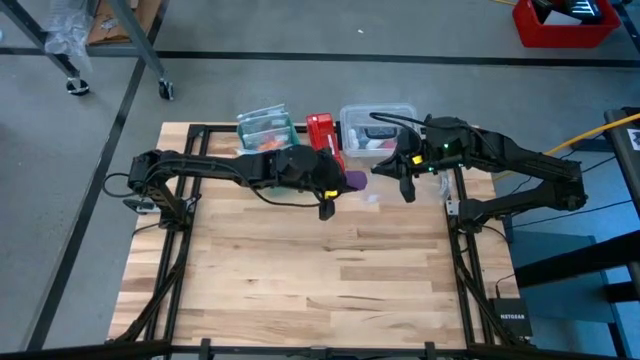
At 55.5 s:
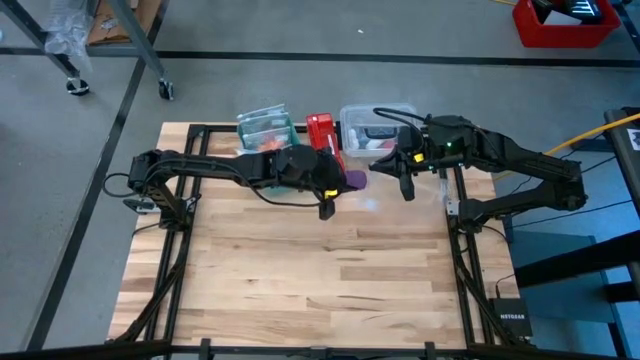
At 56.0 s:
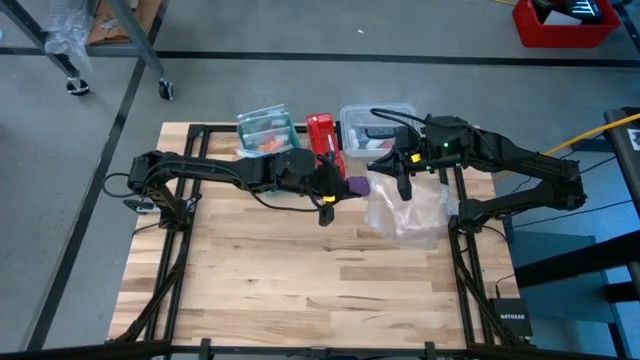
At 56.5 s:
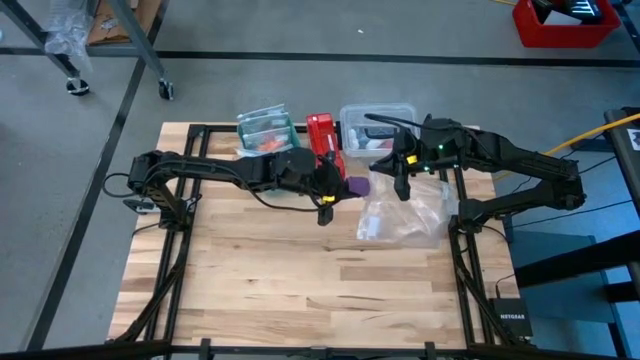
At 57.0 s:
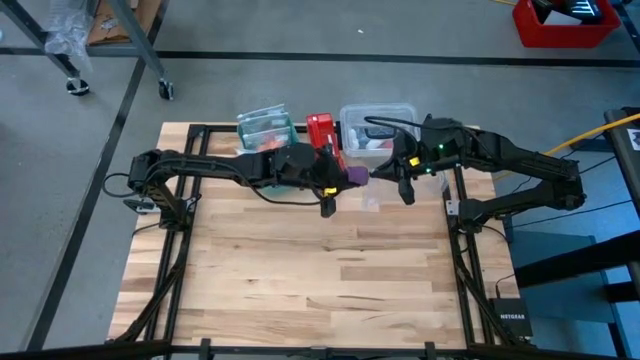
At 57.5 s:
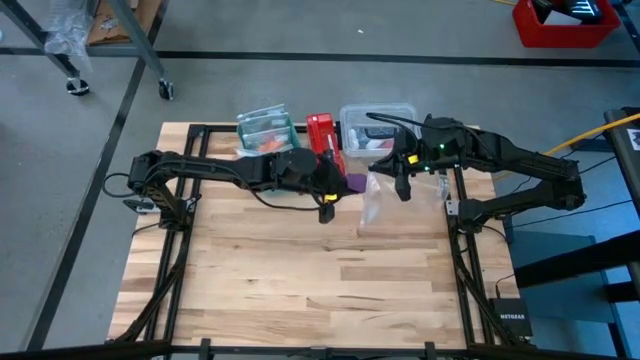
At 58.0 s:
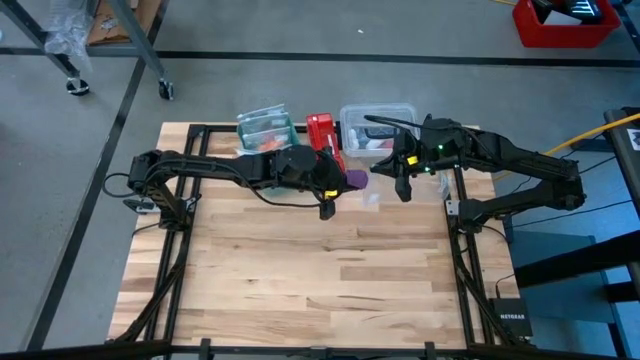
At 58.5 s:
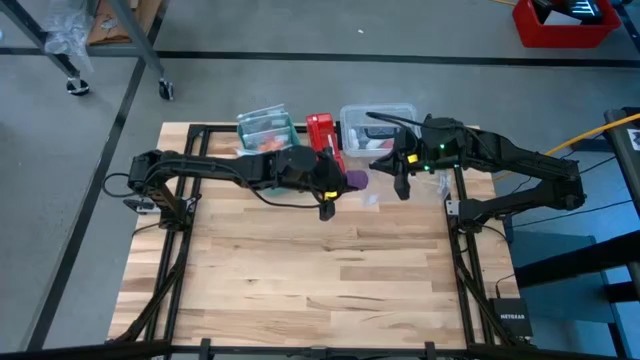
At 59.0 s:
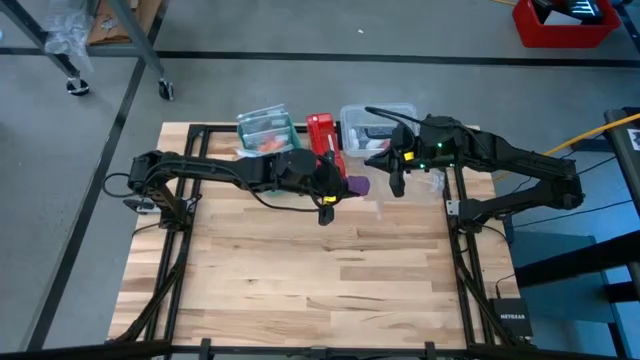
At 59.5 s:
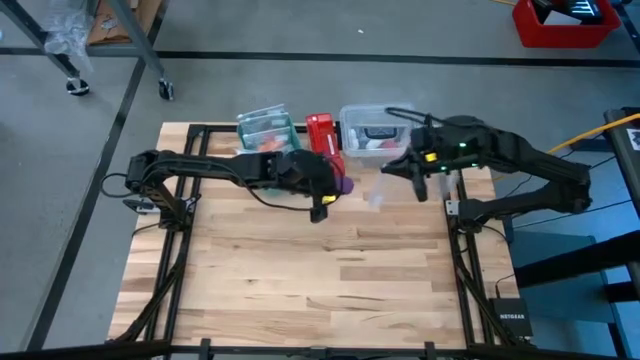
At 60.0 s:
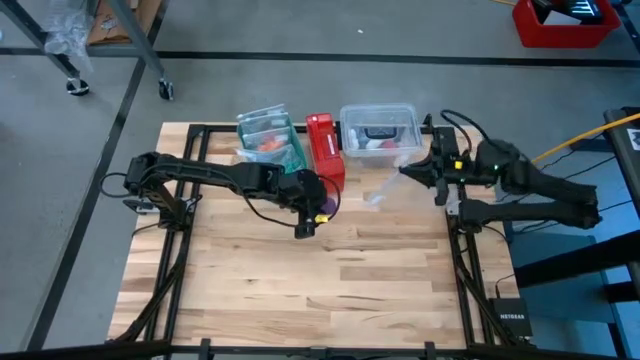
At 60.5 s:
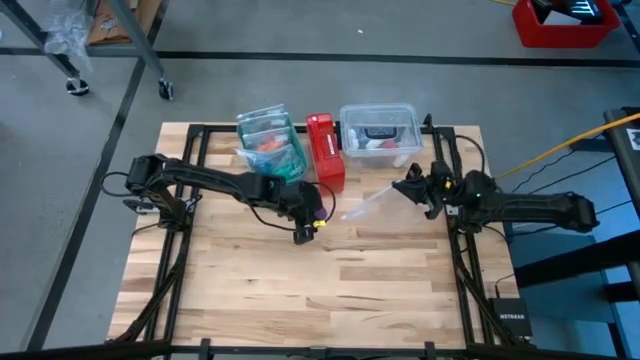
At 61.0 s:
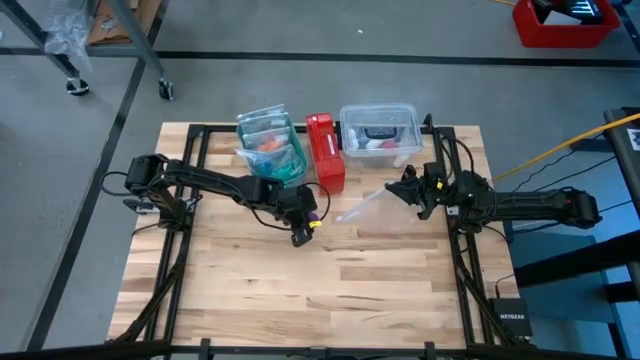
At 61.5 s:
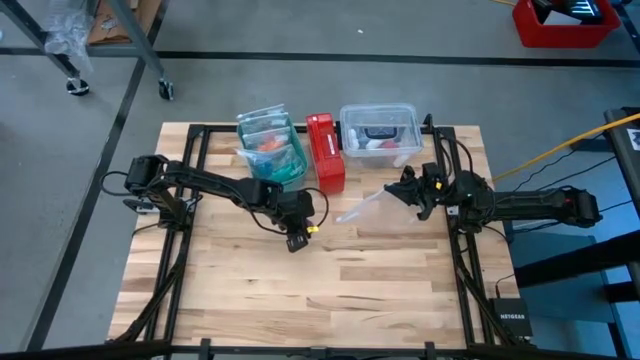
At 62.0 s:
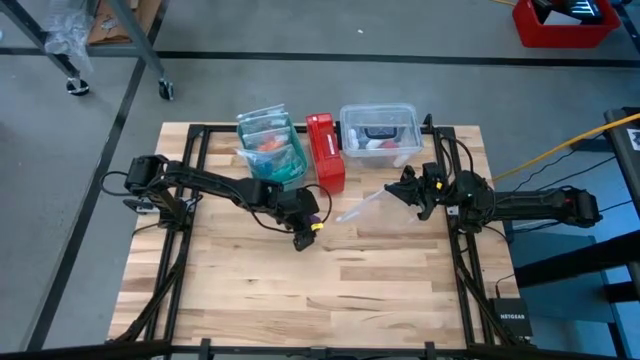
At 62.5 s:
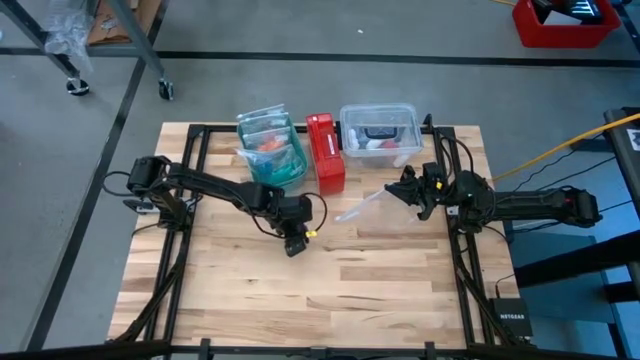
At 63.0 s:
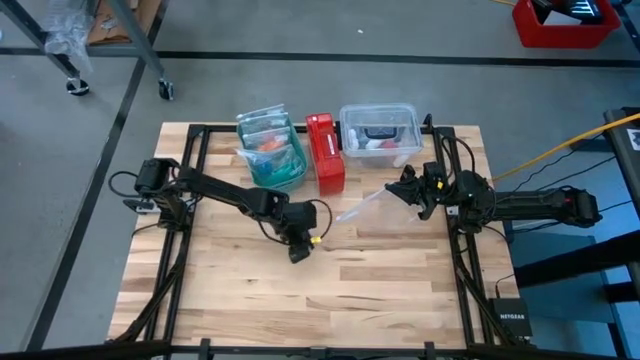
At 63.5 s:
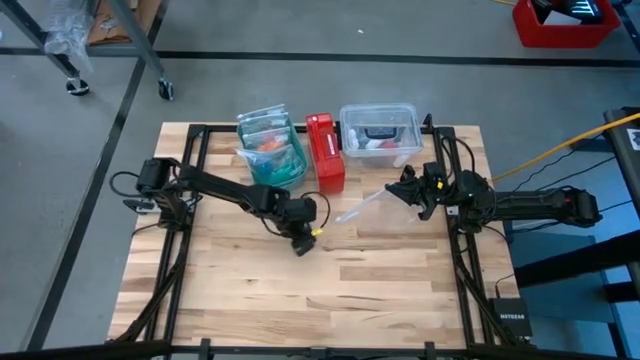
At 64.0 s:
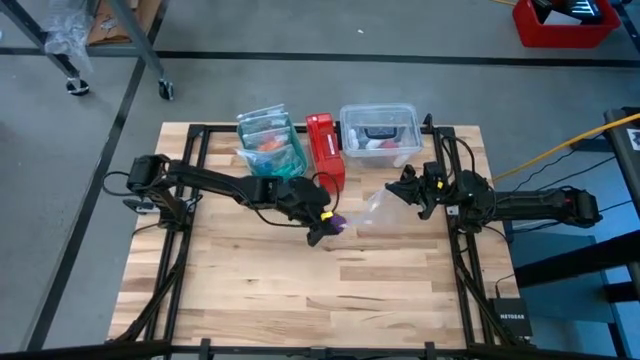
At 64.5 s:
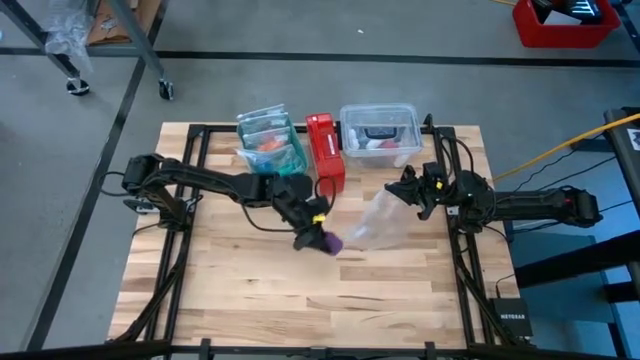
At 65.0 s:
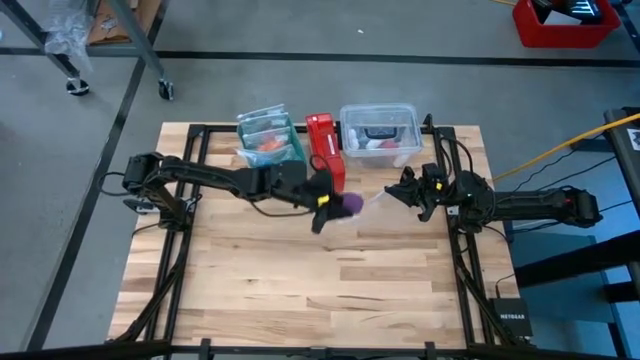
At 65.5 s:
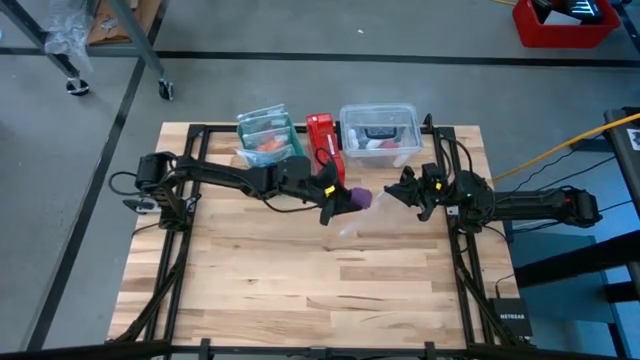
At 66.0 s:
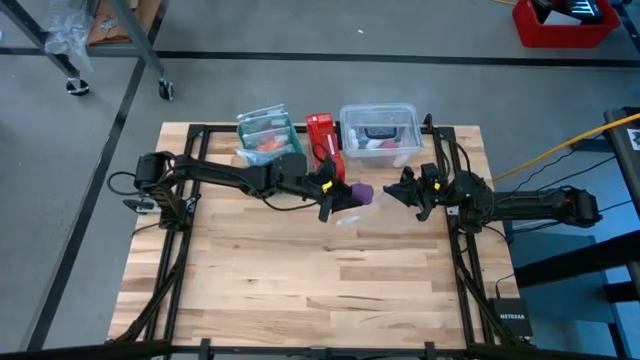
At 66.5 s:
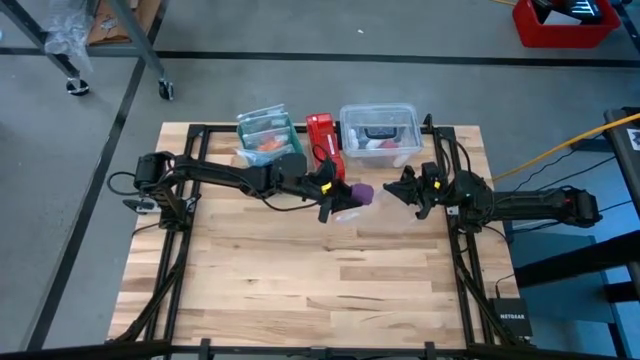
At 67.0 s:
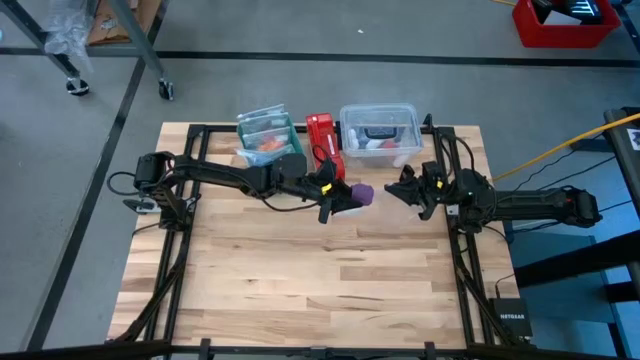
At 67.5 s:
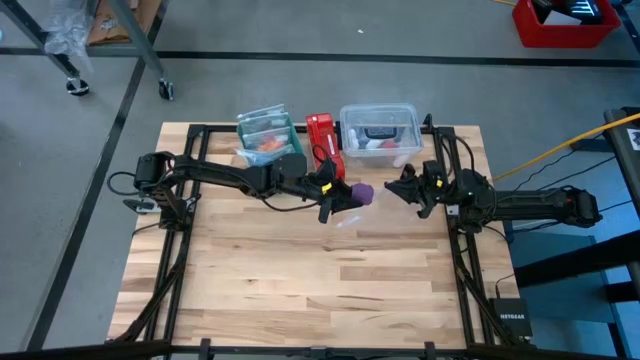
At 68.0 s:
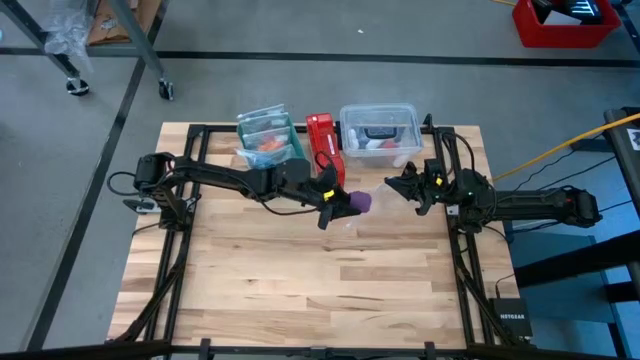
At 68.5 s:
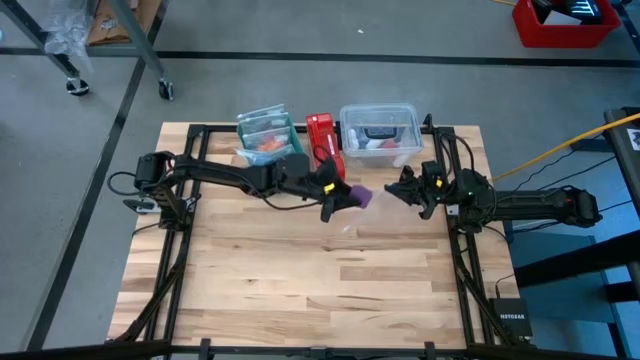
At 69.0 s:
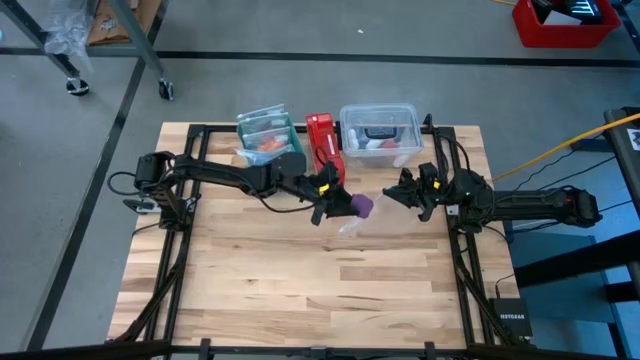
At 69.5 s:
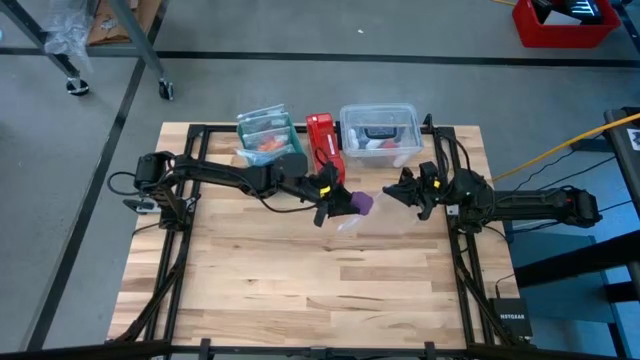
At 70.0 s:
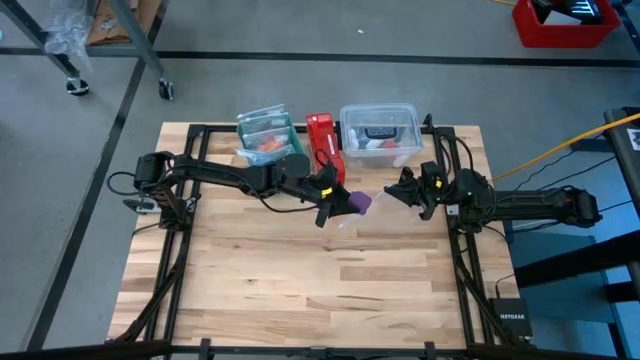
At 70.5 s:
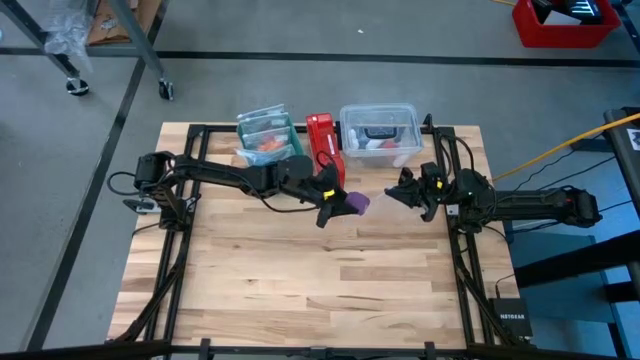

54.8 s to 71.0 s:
Task: Roll bandage
Put the purple bandage into the transparent zip bag

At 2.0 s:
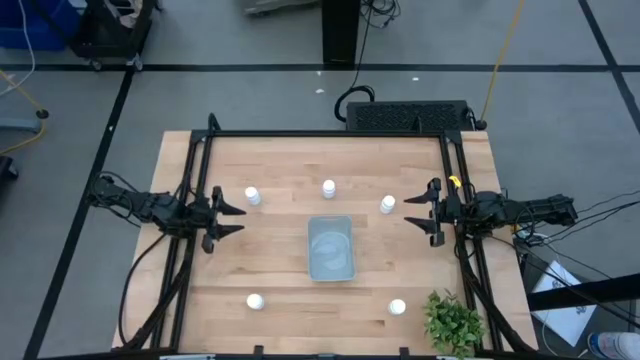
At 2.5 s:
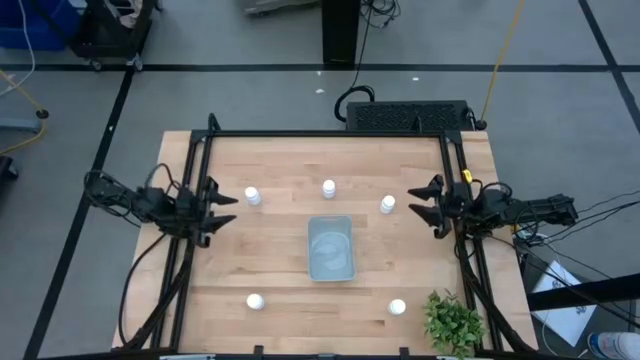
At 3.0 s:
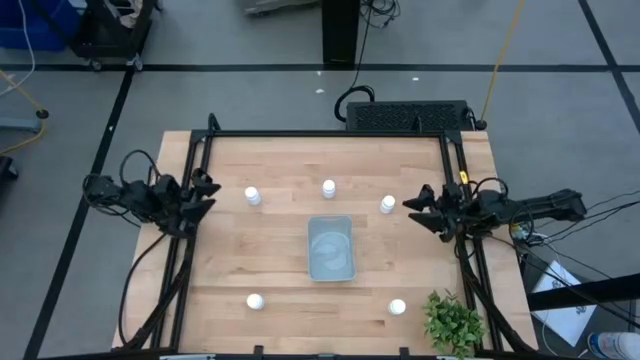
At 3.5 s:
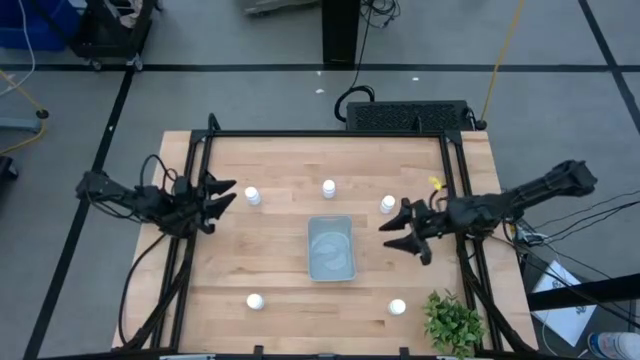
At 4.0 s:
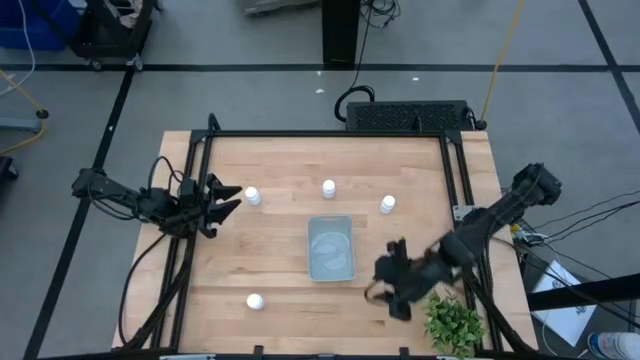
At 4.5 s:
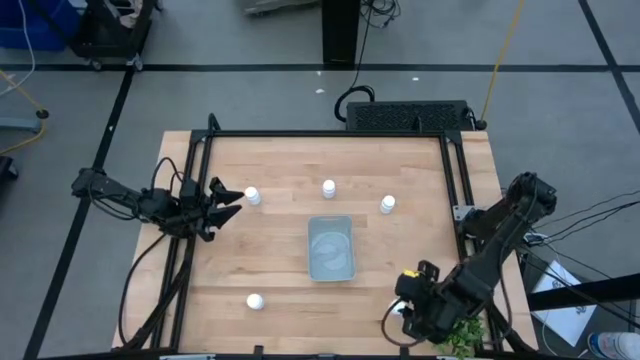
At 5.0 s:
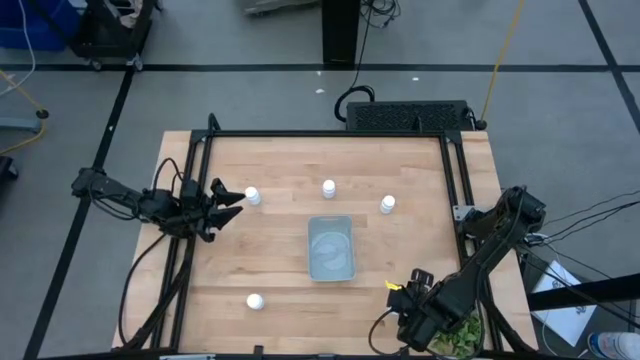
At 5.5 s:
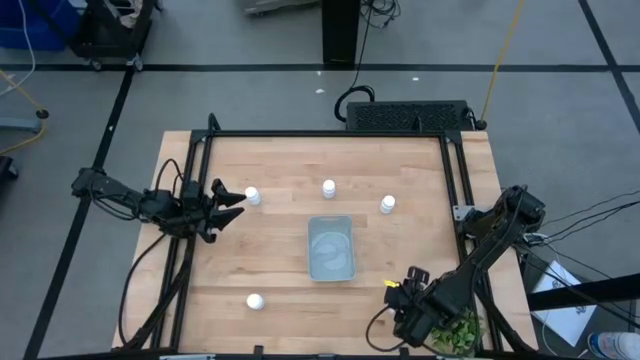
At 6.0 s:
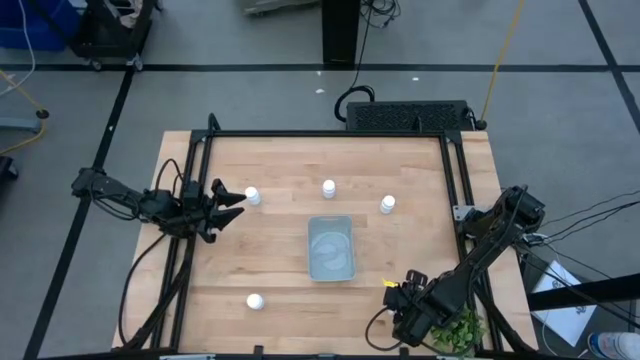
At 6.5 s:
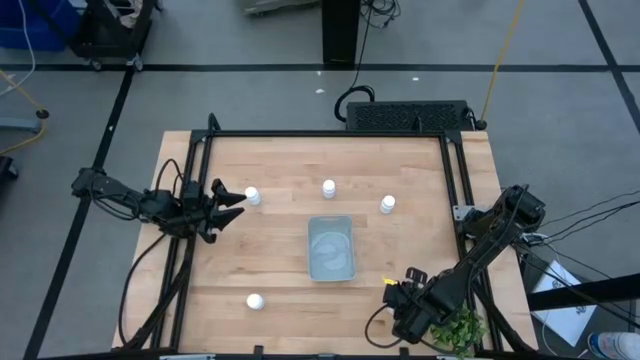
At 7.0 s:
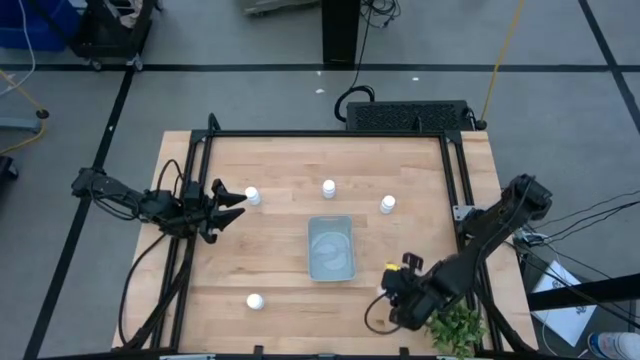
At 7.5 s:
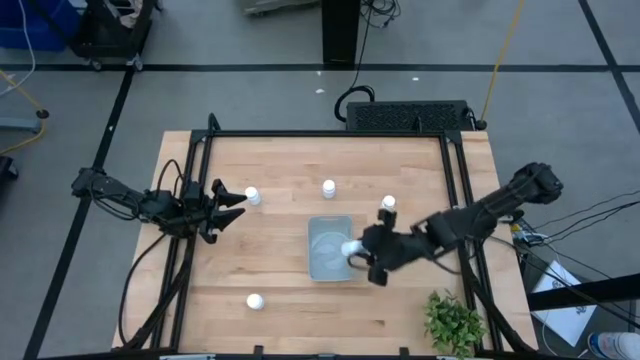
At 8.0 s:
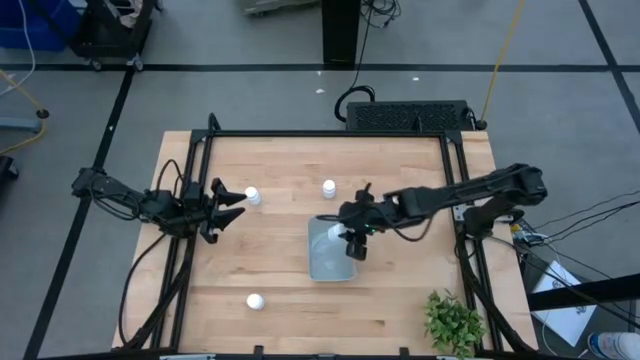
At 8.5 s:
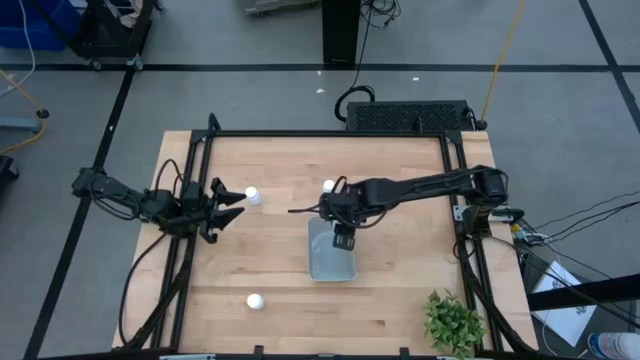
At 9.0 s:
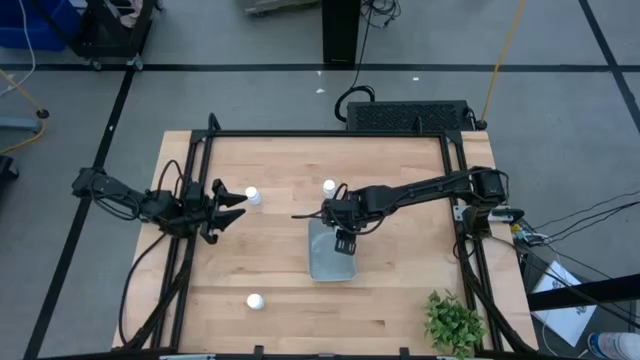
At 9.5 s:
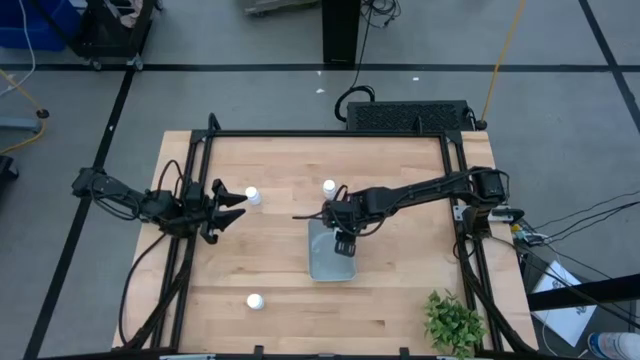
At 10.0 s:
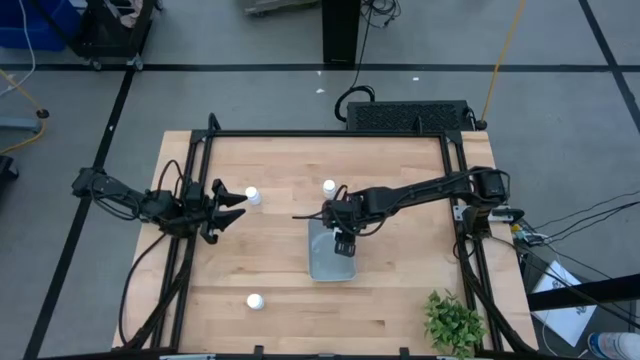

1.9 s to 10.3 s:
Task: Pick and place pill bottles into a basket
Put the white medicine bottle into the gray bin
